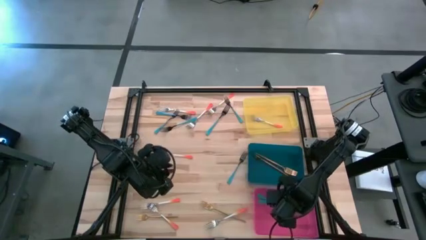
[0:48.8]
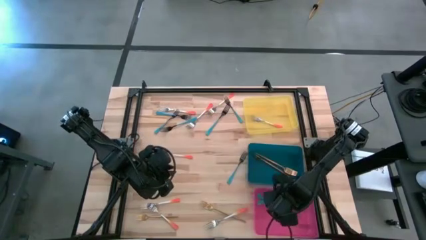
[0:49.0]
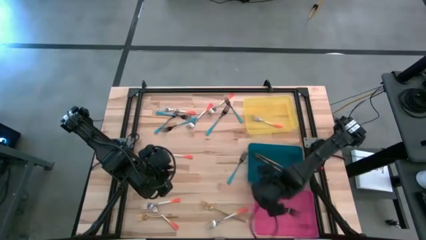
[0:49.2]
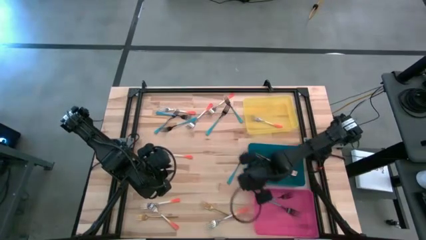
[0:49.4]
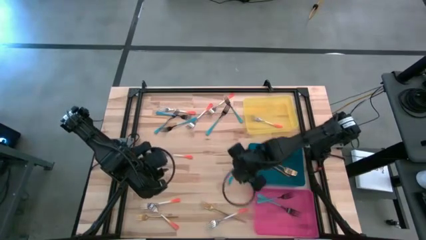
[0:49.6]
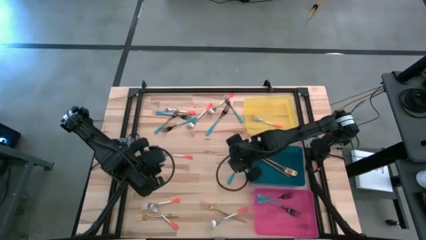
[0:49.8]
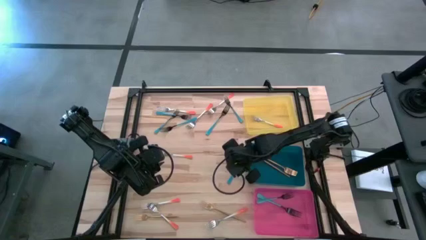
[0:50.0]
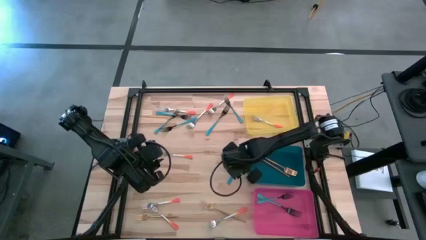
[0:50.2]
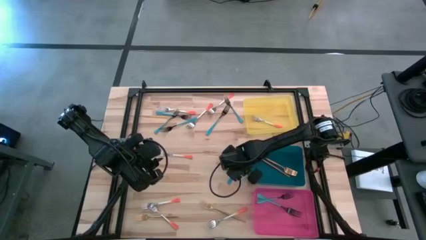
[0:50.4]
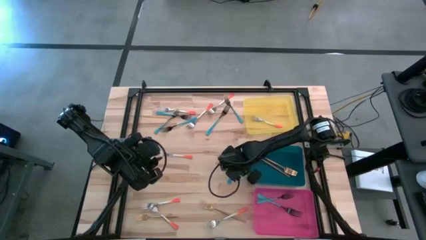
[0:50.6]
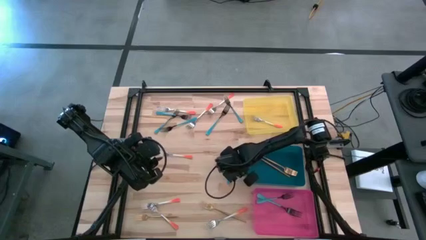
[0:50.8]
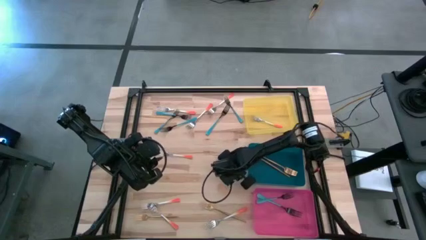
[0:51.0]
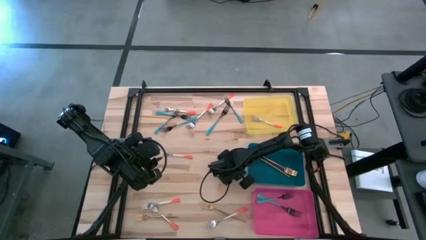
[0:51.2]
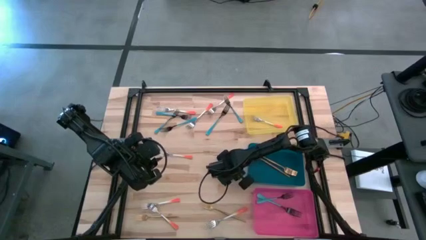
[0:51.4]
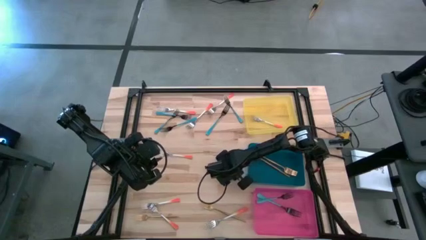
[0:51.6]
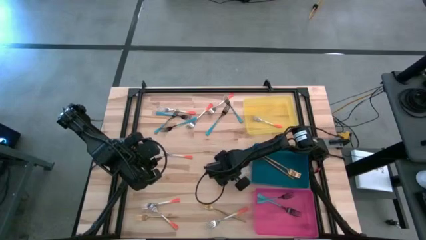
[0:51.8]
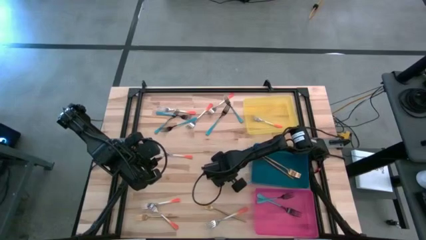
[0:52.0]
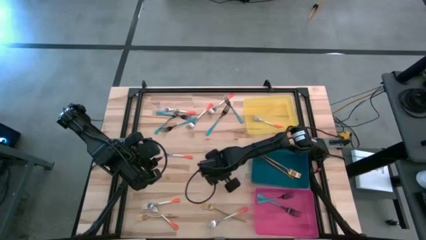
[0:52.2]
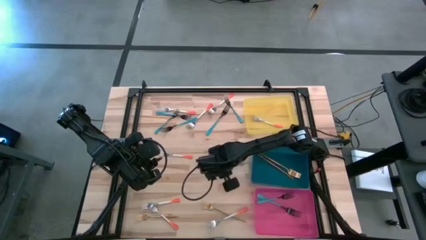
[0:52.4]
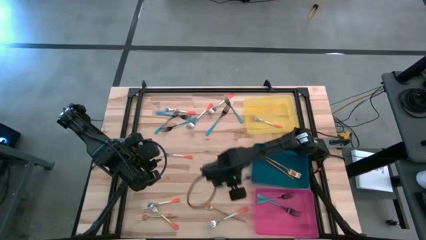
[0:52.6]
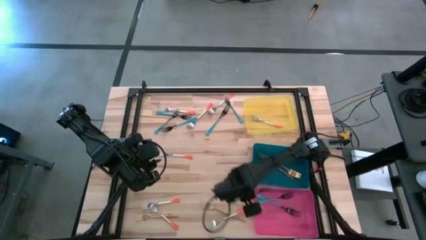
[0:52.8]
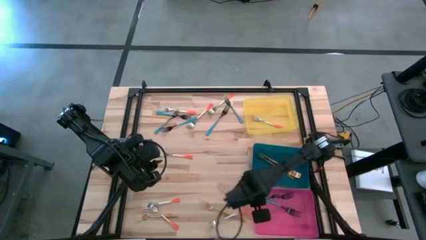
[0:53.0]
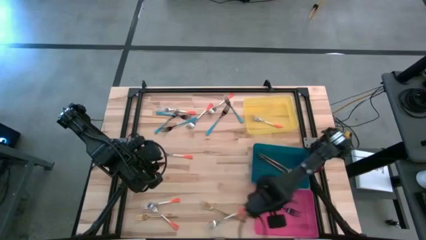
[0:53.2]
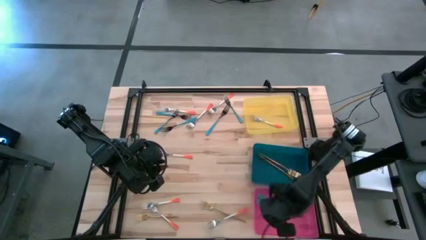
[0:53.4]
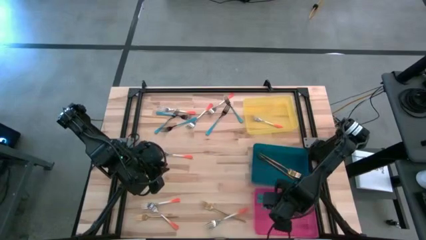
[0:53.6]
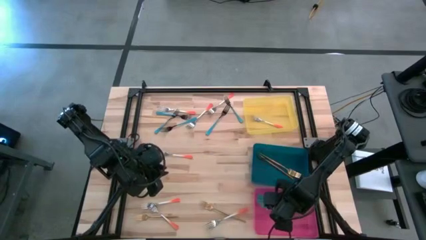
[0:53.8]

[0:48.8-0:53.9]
Task: Sort silverware by color (type)
Put the blue fork into the pink bin

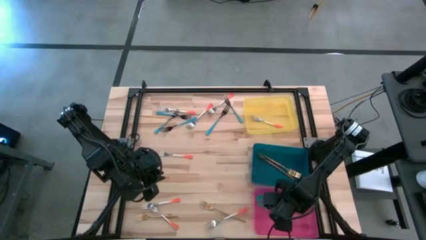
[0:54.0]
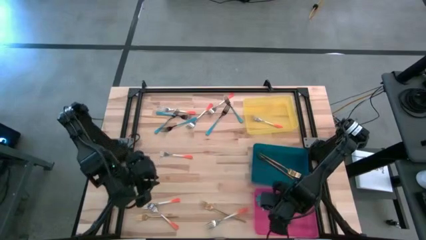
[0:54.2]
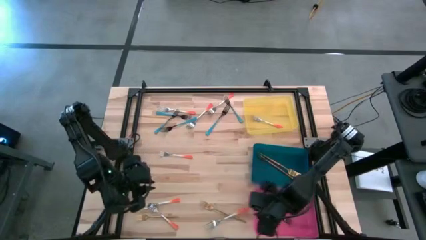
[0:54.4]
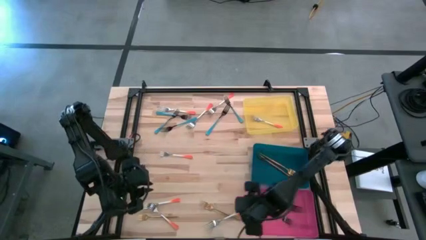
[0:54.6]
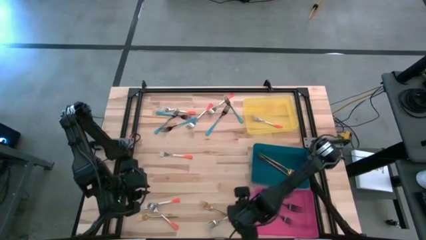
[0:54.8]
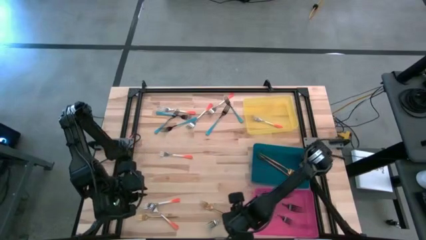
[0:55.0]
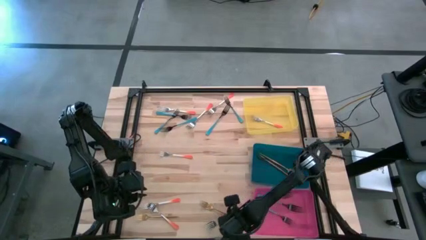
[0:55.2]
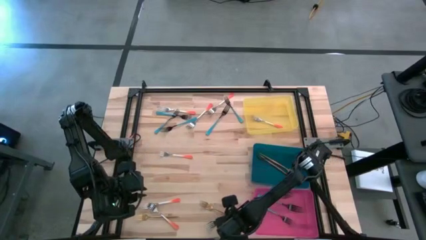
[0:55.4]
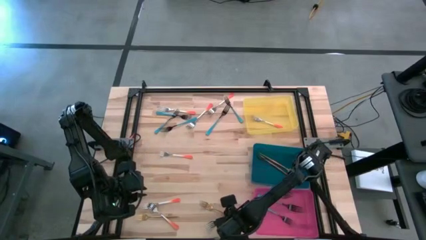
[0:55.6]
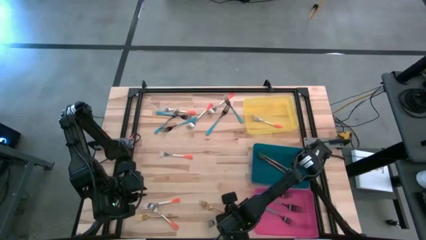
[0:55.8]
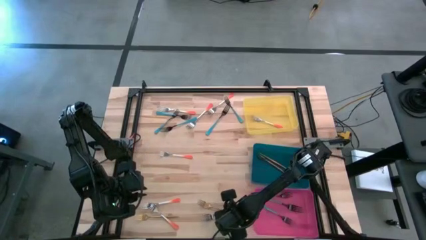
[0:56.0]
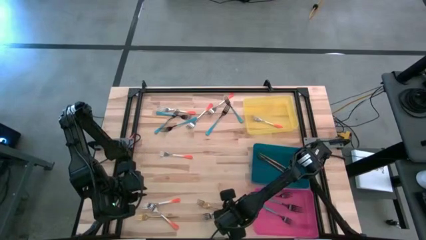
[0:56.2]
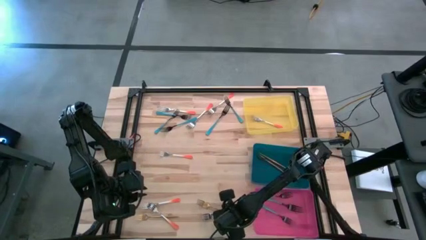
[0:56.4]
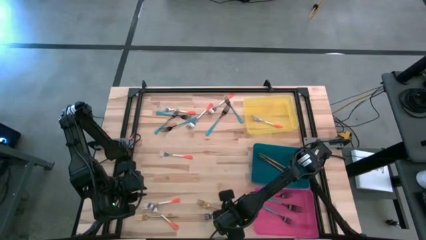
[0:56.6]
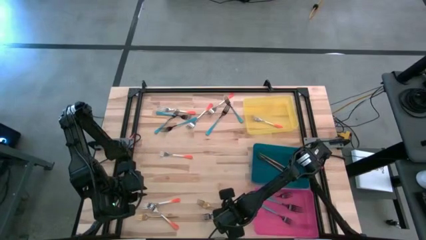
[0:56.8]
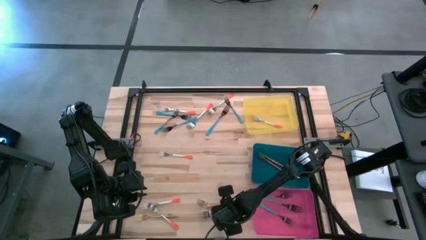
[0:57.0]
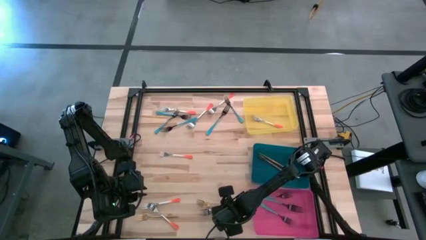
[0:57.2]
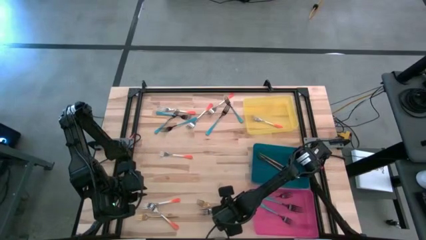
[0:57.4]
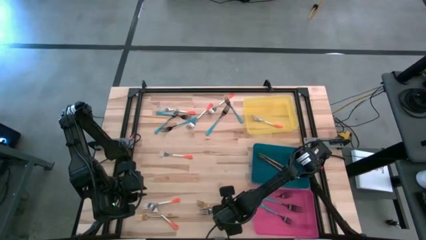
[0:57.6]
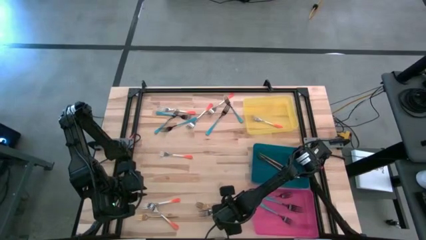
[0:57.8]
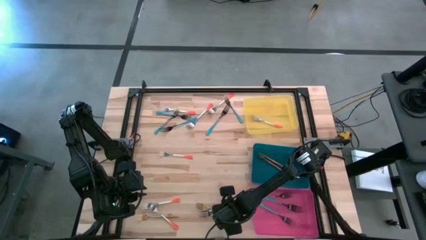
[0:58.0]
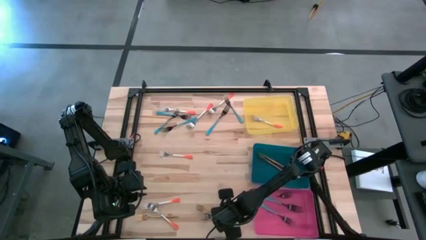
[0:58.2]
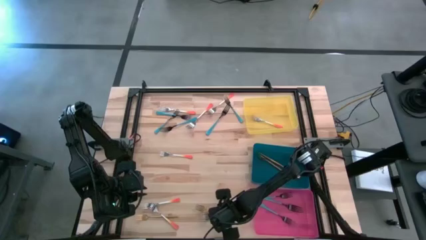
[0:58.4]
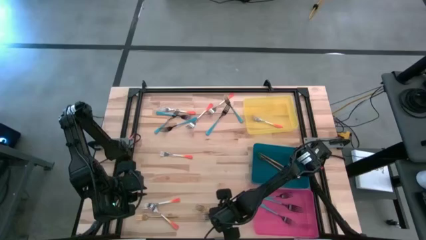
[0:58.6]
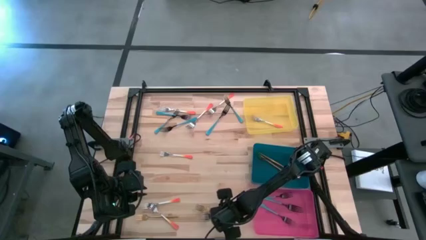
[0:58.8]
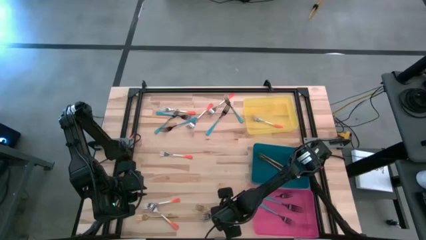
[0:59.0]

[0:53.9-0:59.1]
Put the orange fork into the yellow bin

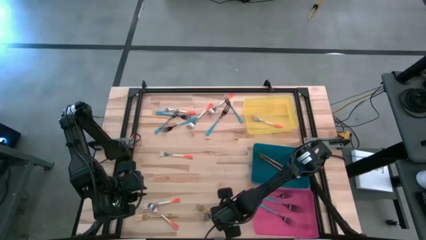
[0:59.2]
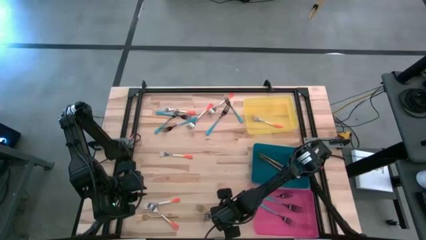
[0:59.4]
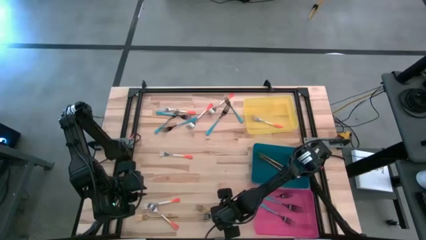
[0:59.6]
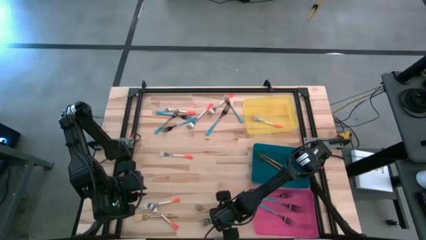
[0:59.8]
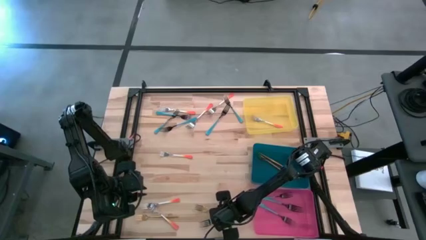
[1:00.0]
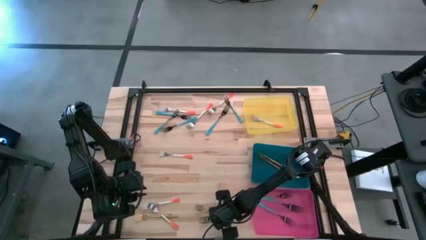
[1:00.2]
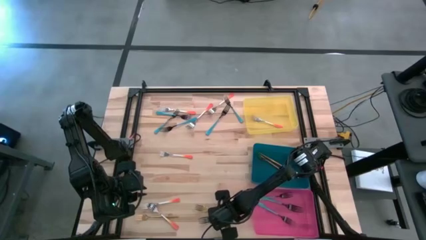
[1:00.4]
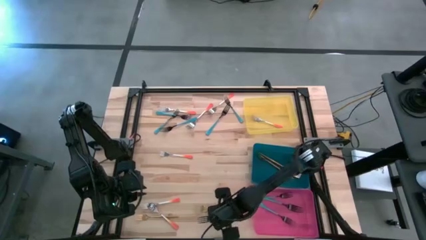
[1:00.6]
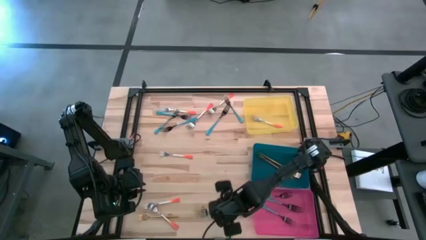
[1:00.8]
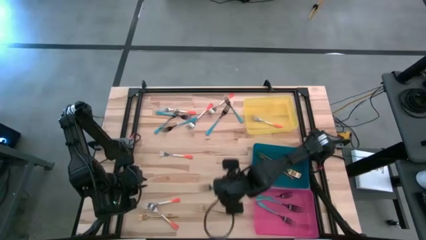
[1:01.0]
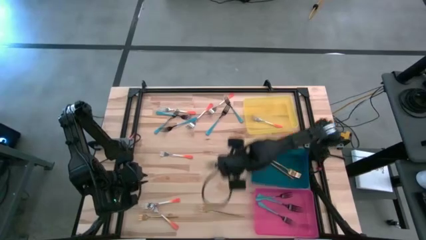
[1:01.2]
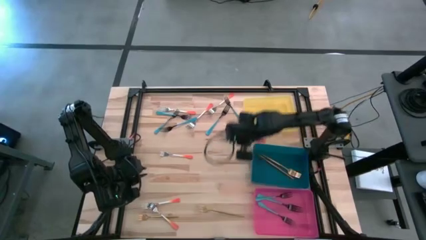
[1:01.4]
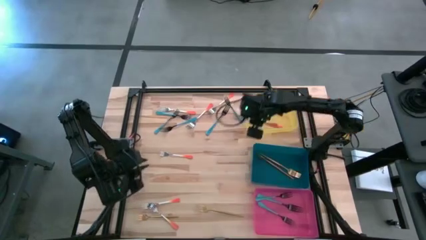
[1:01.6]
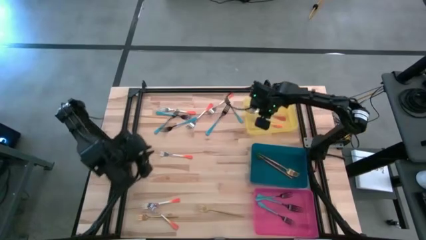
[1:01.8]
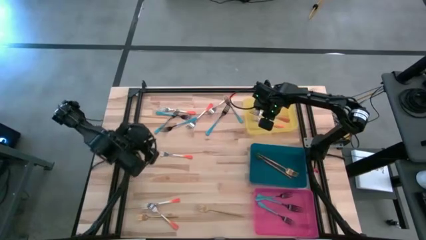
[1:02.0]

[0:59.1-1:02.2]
Put the orange fork into the yellow bin

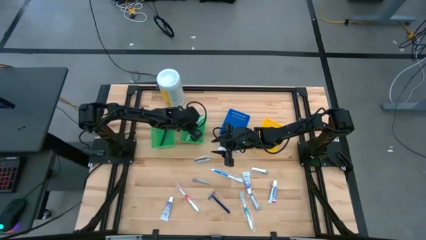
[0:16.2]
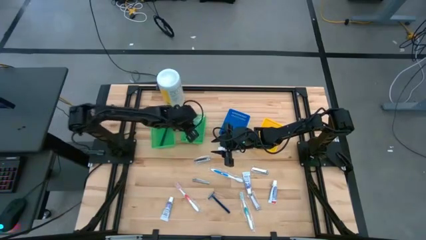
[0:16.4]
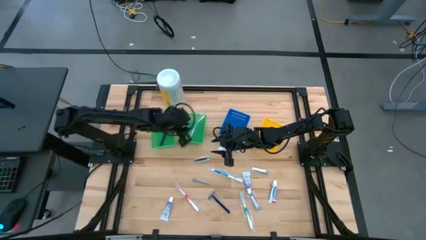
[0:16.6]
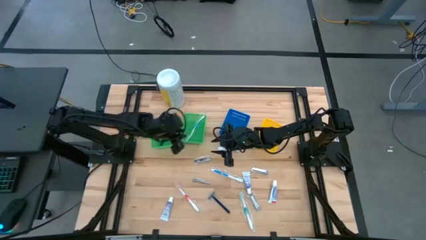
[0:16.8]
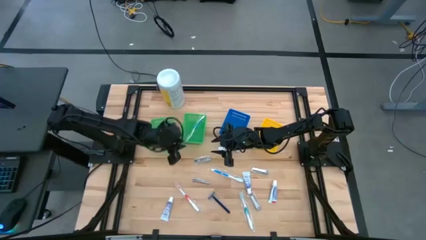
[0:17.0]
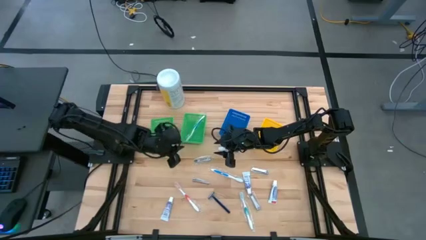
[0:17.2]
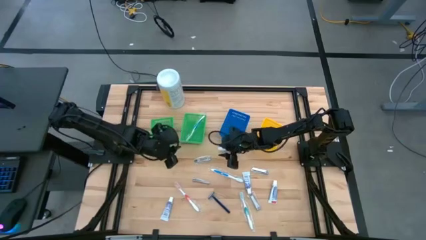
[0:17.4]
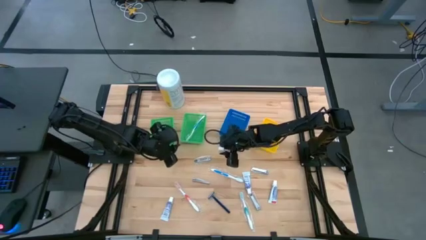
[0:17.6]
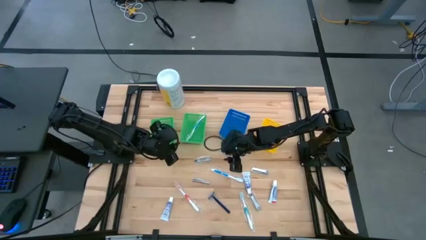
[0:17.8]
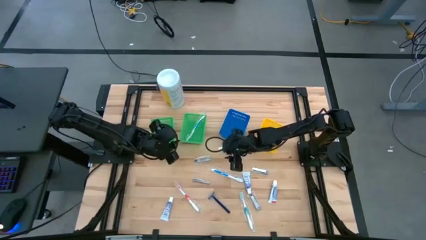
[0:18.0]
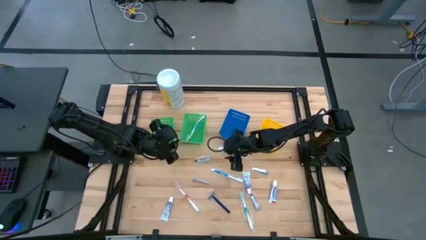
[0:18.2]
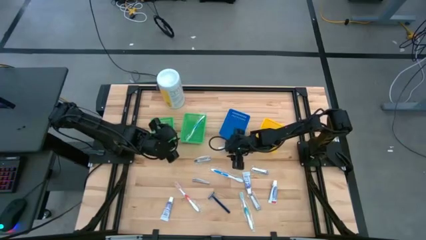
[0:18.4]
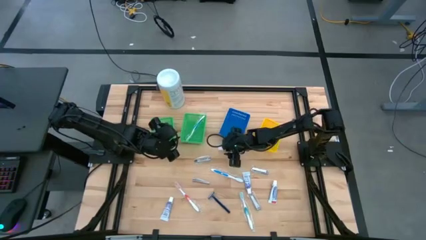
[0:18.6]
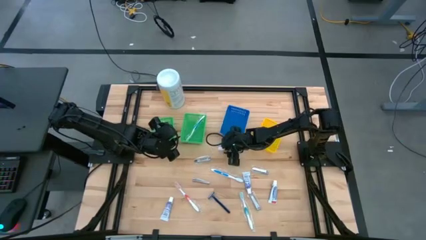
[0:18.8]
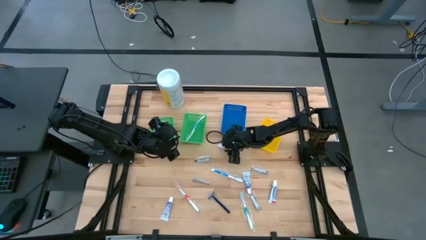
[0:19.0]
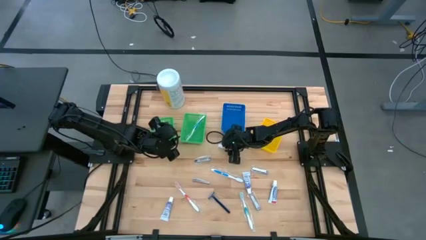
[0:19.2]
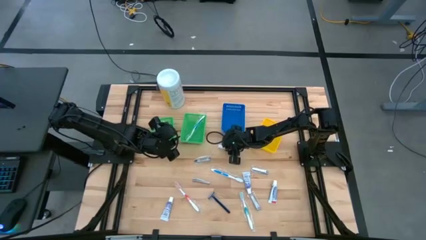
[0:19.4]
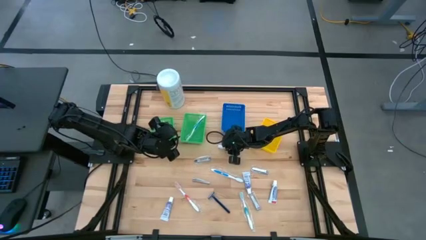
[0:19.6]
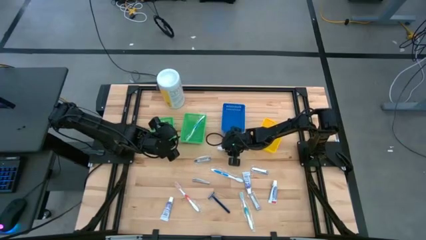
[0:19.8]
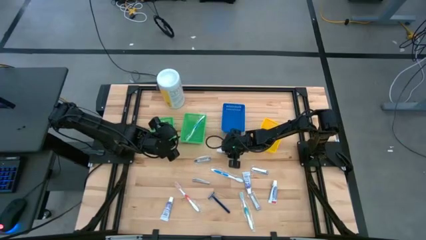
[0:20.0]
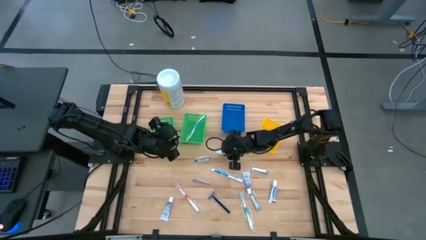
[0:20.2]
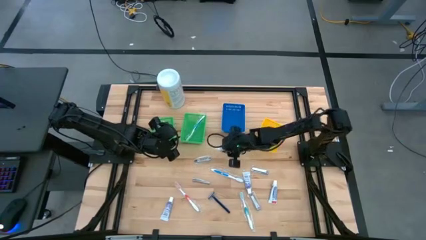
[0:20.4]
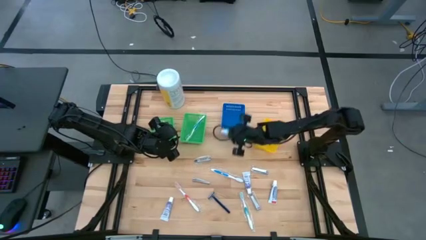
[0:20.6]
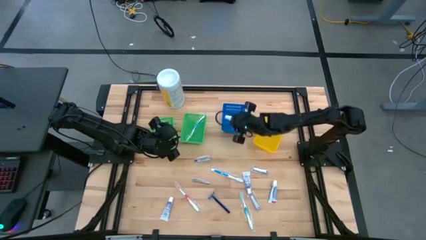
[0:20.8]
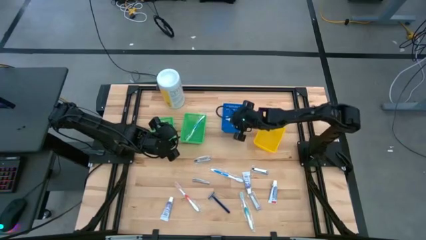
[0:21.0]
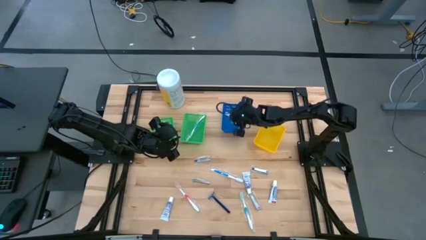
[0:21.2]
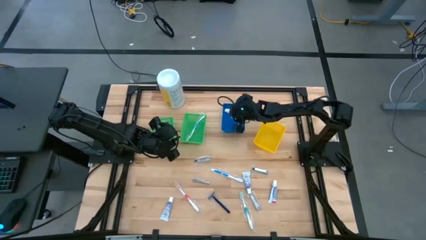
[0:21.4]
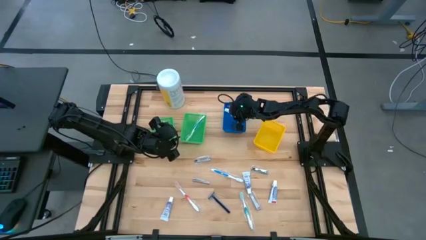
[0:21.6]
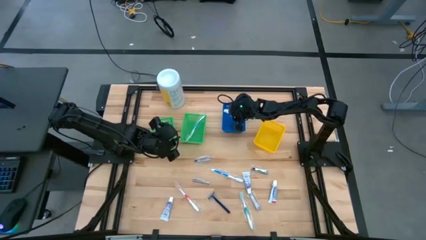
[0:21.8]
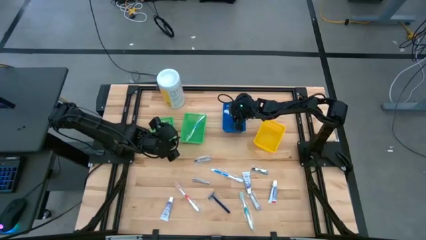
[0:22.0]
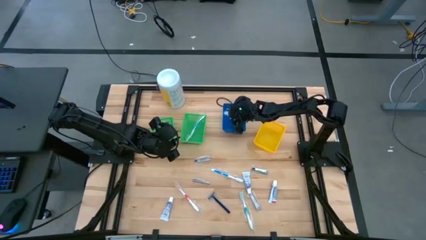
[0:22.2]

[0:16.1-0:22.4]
Task: Pick & Place Travel size toiletries
Put the purple toothpaste into the blue bin
